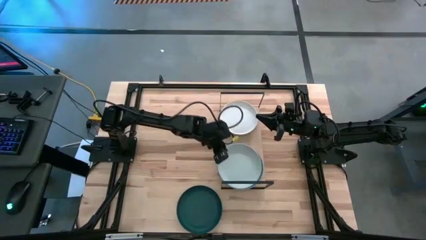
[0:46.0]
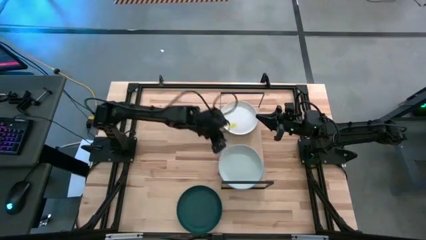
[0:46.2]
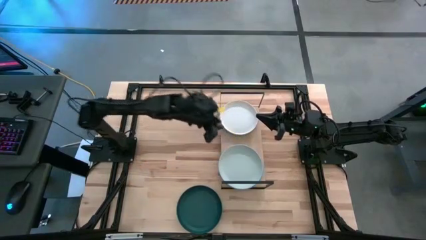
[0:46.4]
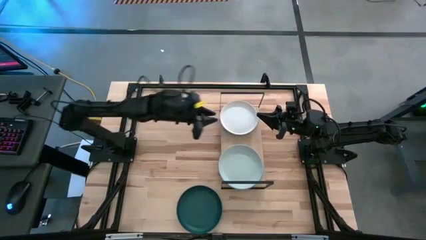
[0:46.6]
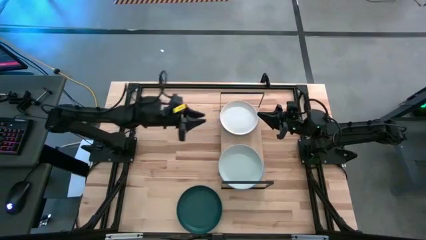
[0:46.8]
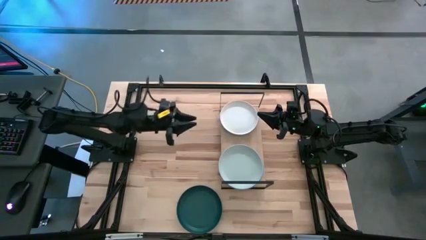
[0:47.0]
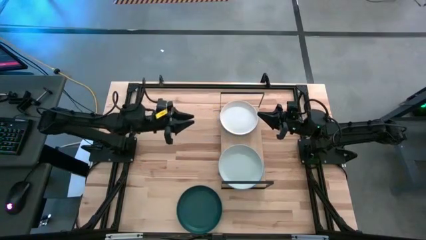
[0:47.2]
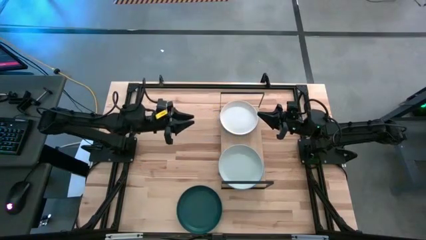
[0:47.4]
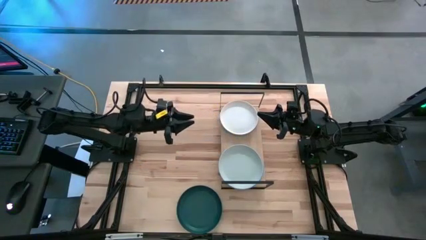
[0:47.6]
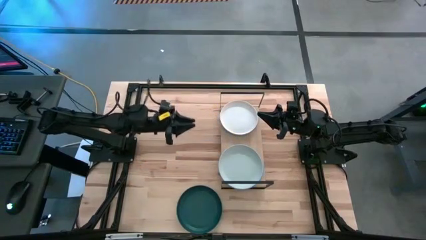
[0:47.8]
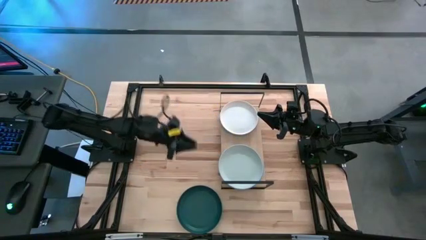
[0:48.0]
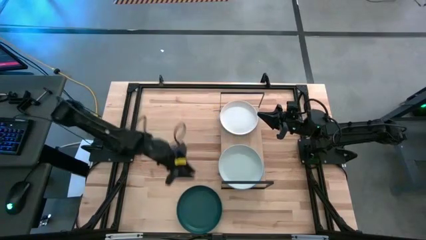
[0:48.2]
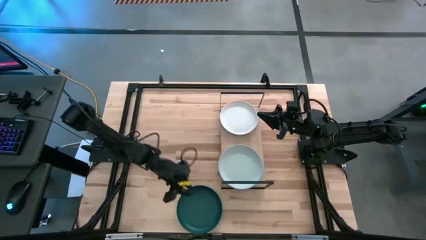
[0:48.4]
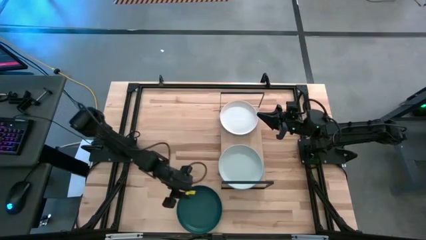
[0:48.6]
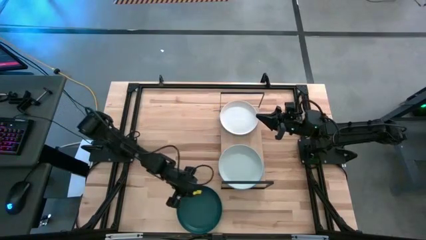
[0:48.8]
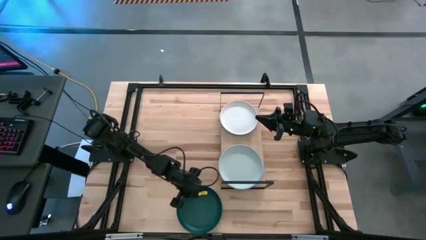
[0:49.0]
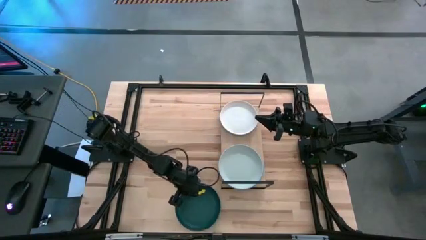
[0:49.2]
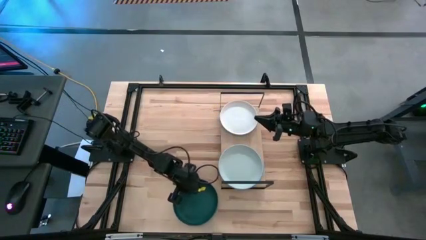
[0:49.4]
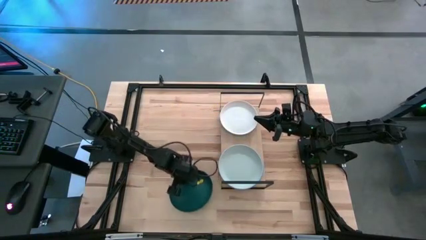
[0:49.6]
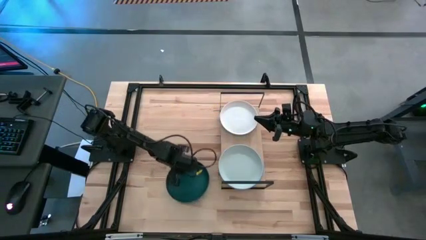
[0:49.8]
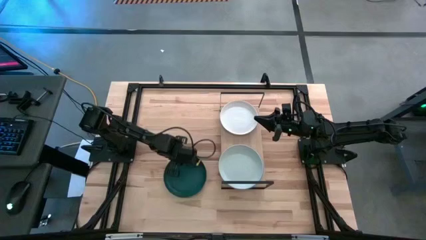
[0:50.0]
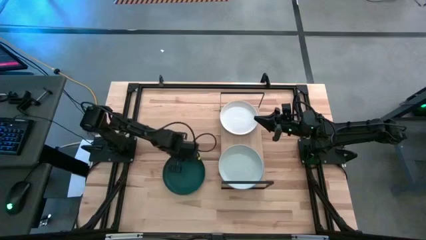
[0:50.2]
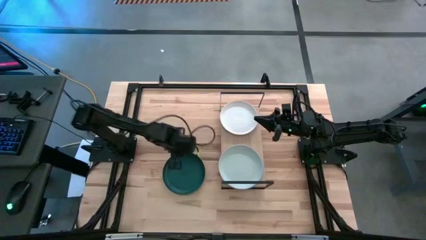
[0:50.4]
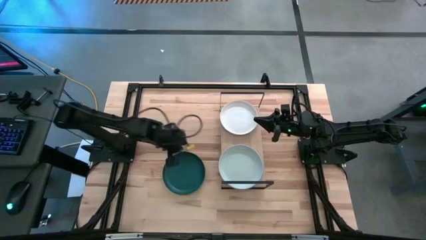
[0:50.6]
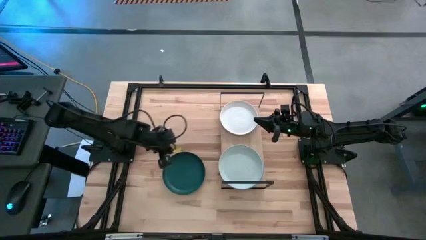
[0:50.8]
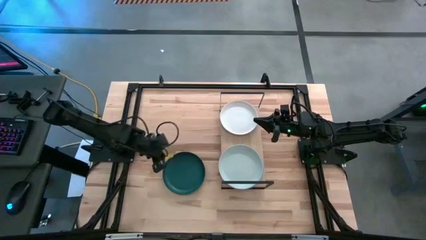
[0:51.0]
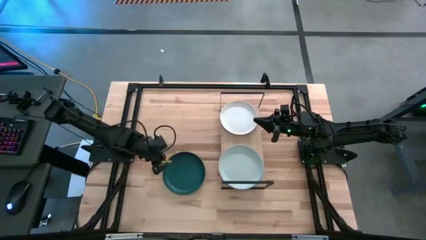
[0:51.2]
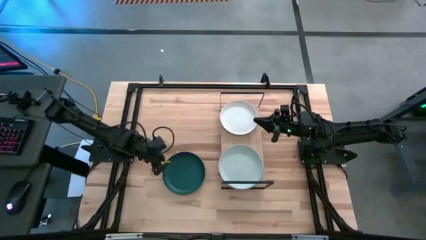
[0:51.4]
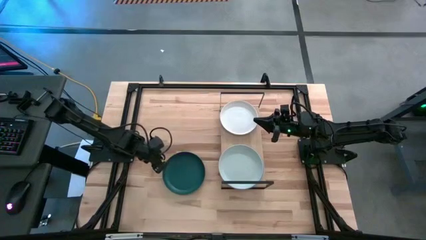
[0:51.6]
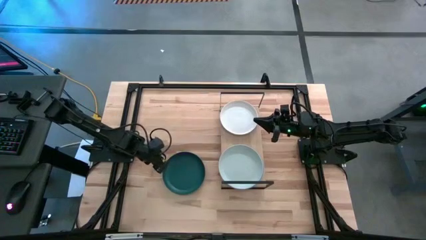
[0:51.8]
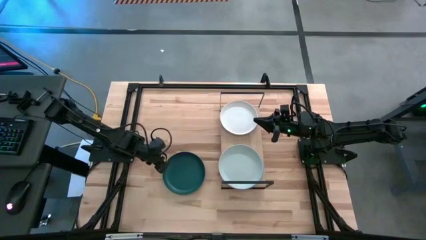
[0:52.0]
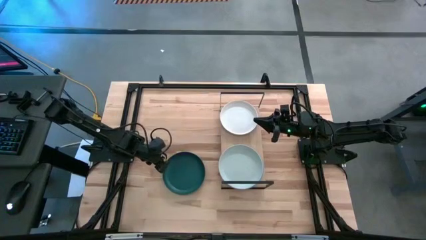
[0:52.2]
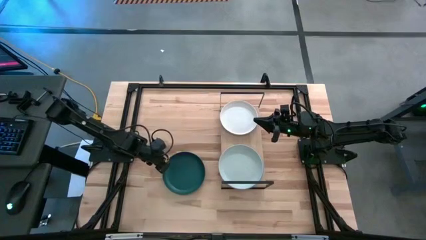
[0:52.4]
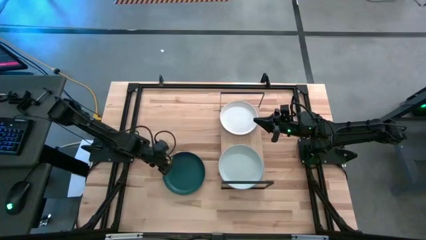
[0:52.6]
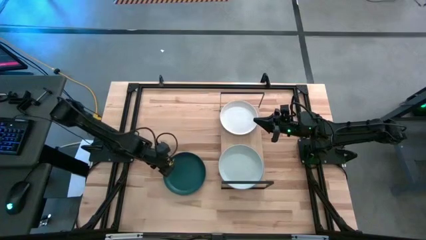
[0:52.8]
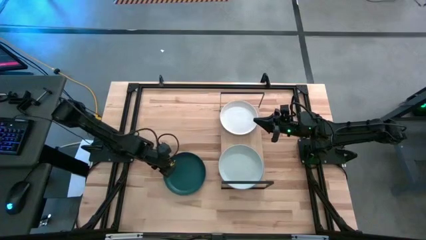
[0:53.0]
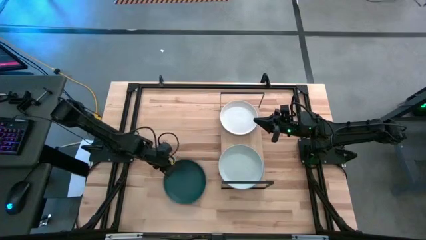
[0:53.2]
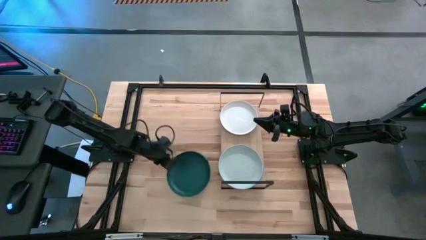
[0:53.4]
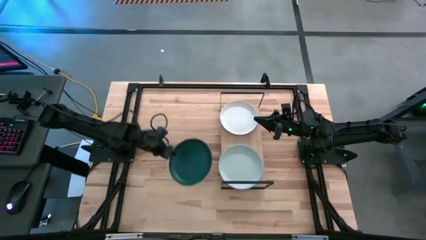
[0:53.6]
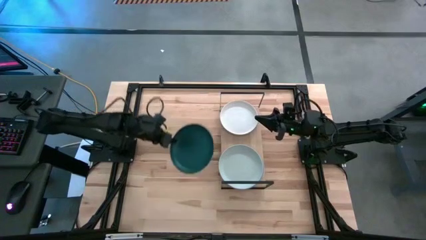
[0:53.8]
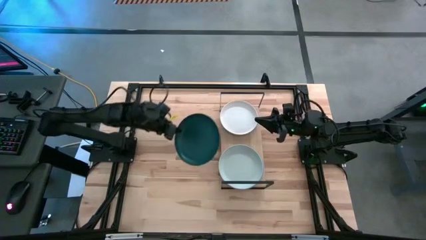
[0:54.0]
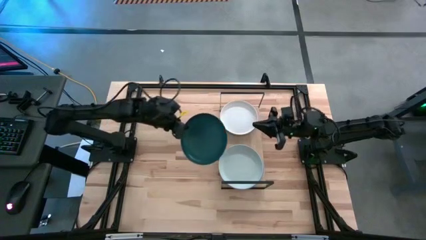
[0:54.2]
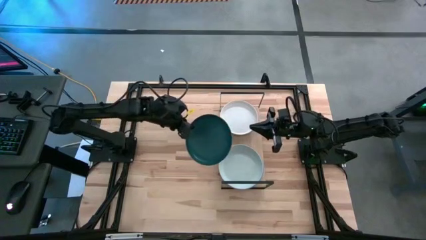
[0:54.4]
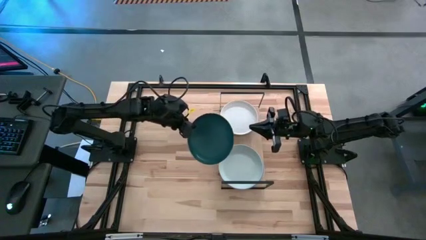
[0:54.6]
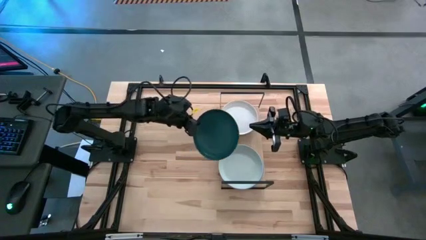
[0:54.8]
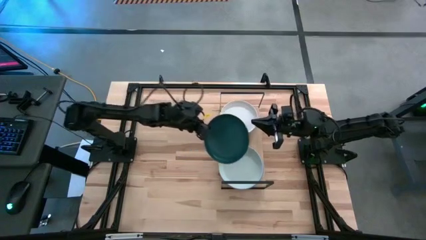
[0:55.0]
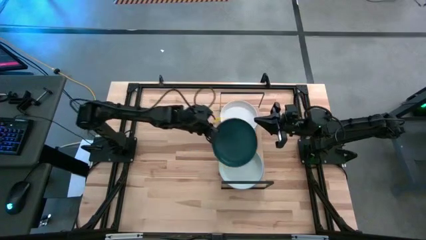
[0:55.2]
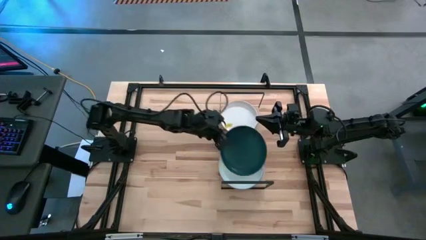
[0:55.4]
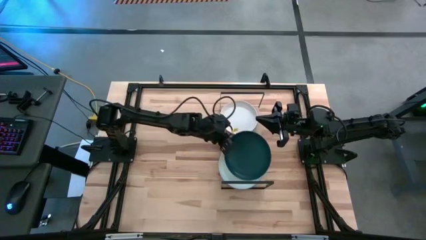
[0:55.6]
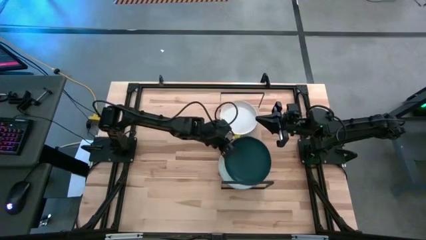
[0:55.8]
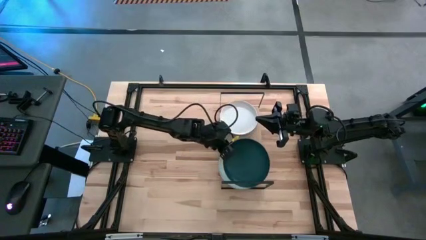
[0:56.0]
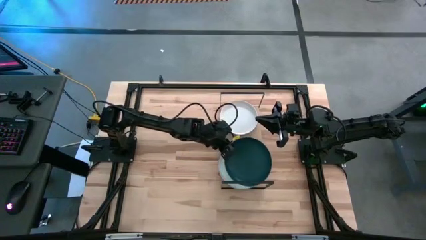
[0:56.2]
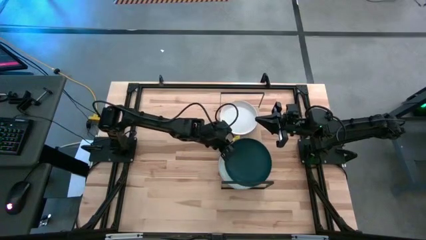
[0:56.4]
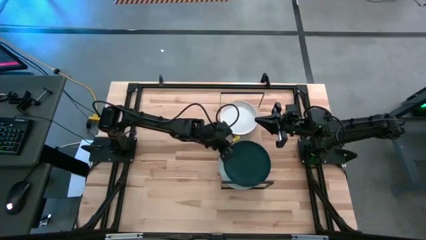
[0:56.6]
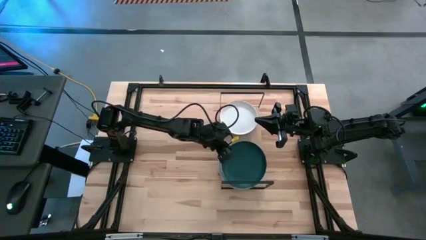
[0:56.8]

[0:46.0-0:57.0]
Task: Place and stack plates onto a shelf
Stack the dark green plate on top of the gray plate on the shelf

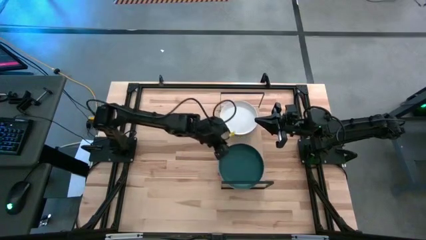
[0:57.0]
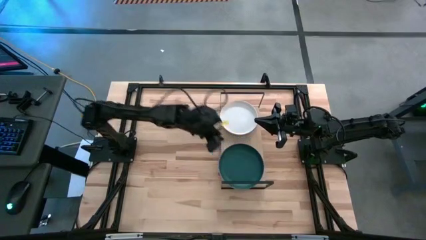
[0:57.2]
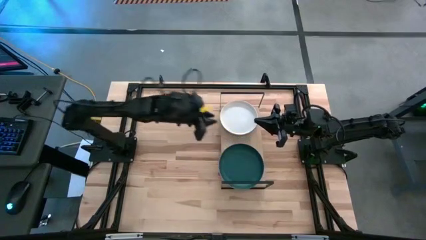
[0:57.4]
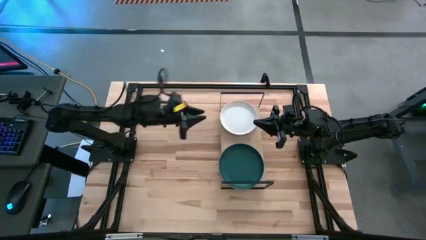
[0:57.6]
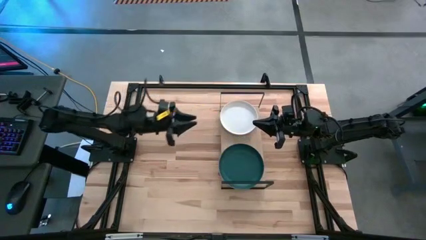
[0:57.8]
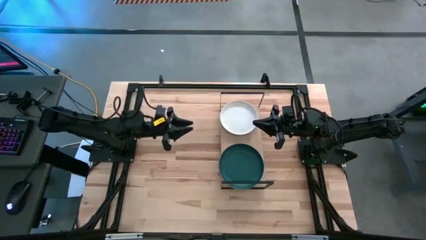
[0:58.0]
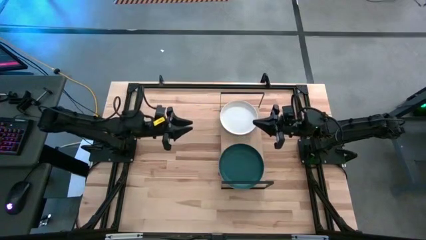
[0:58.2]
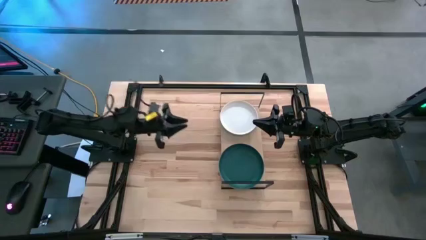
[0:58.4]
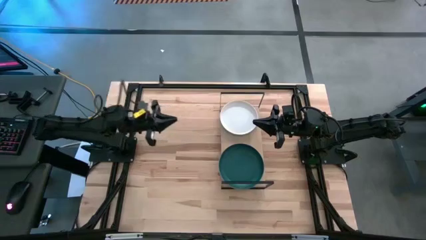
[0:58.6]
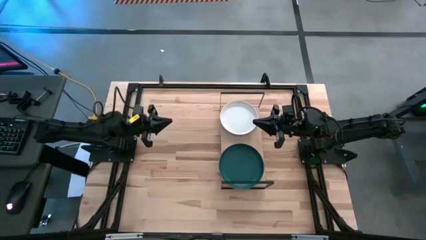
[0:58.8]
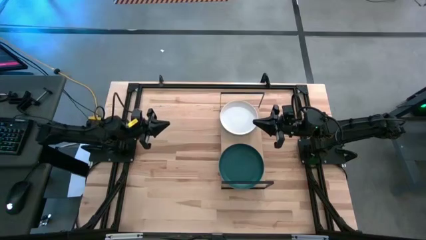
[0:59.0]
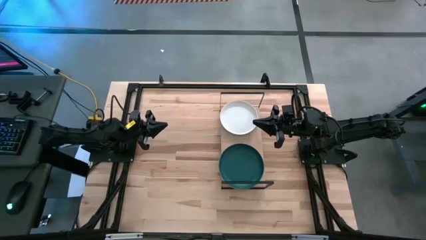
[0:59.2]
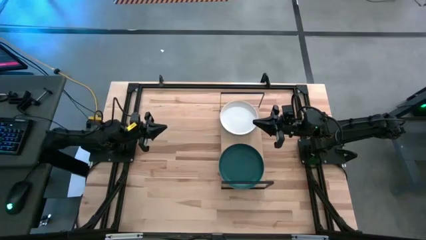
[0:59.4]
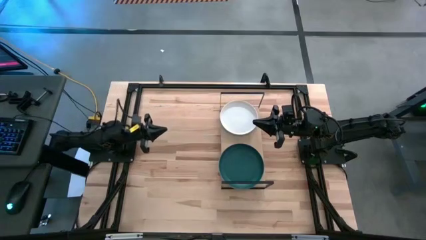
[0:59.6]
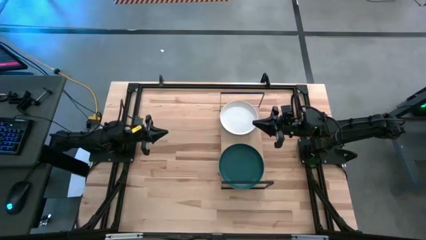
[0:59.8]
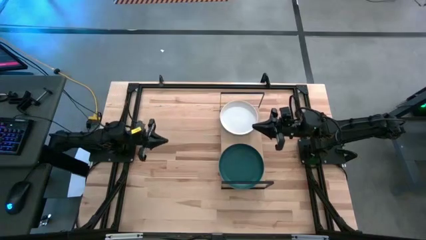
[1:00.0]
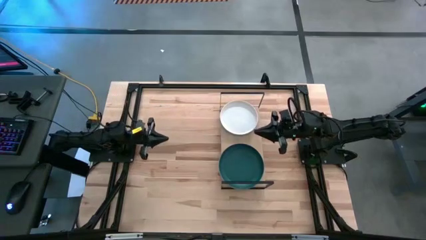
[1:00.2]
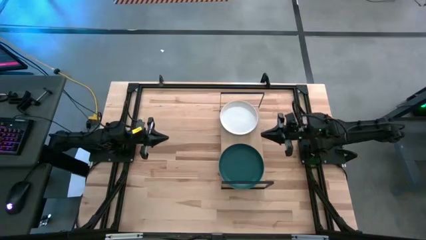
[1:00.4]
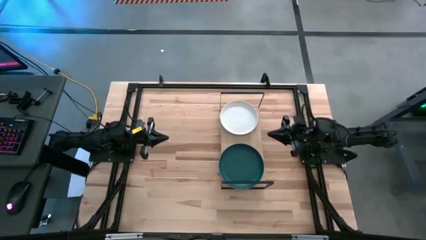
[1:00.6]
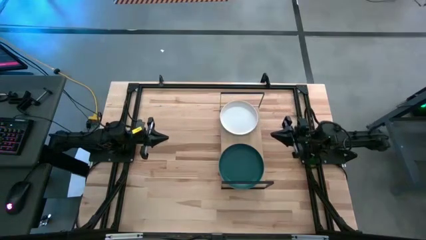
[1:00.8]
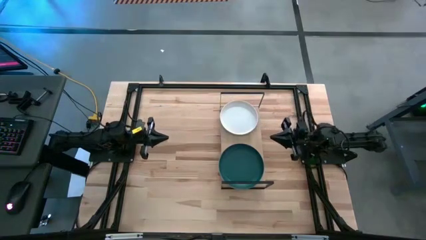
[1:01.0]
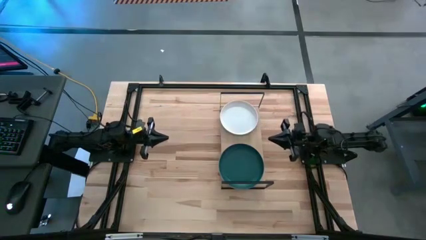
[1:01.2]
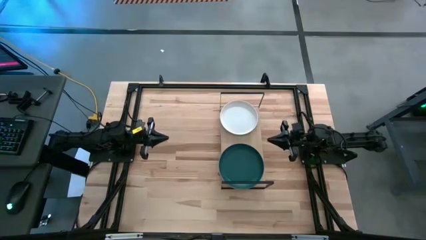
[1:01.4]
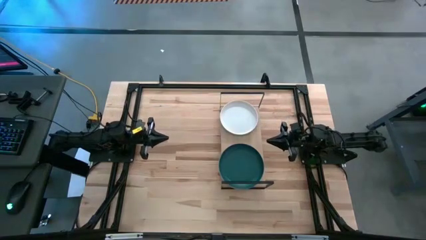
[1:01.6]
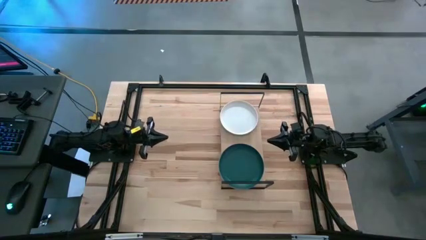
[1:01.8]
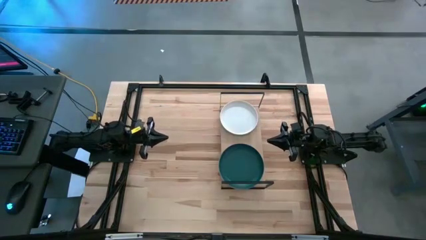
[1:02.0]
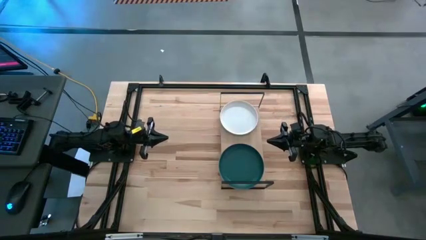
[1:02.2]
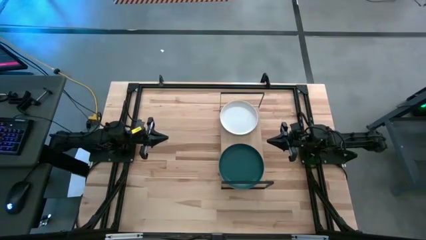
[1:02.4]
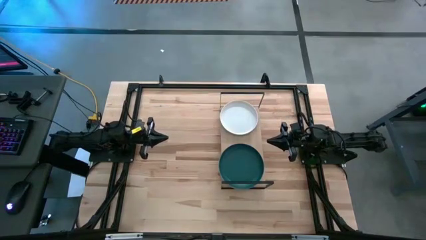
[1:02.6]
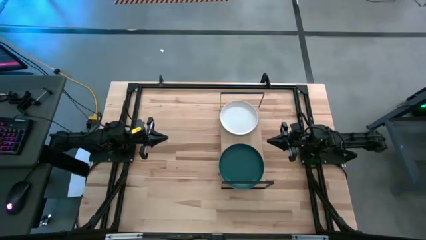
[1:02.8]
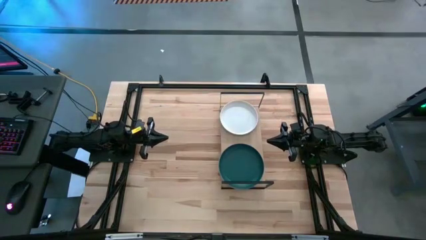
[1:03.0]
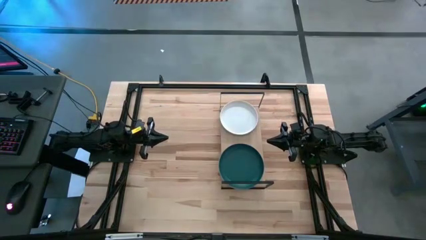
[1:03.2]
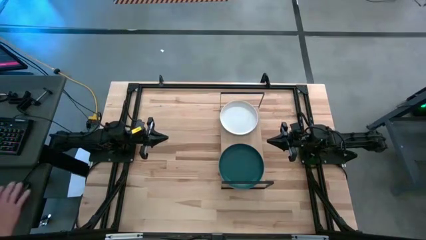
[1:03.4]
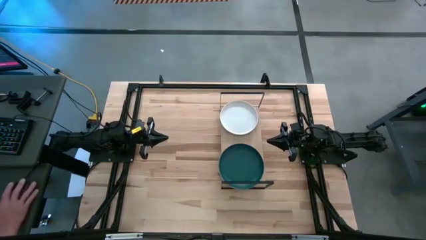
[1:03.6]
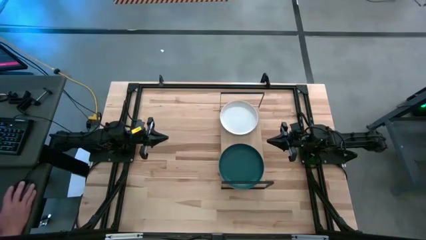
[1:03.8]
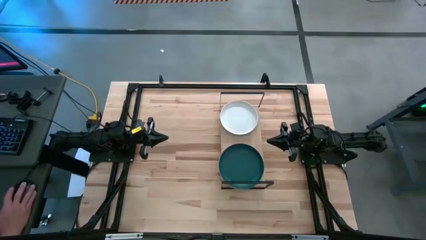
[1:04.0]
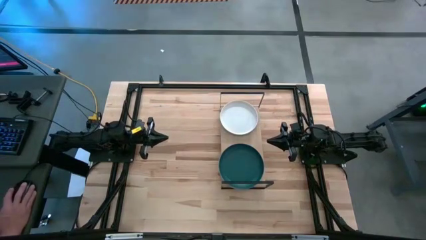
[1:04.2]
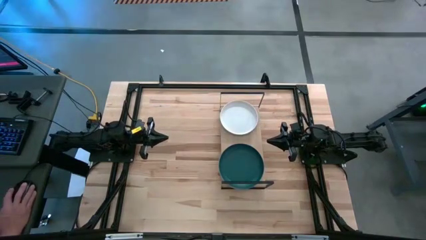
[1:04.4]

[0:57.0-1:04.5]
Return to Home Position
